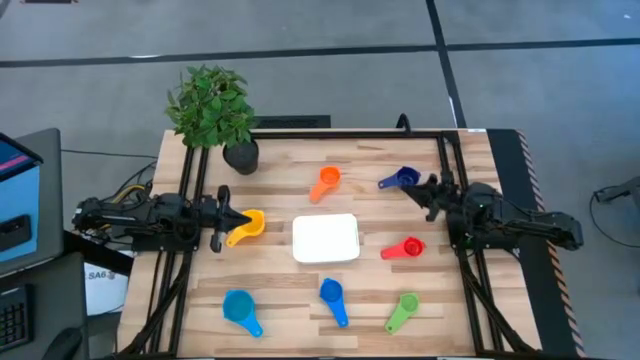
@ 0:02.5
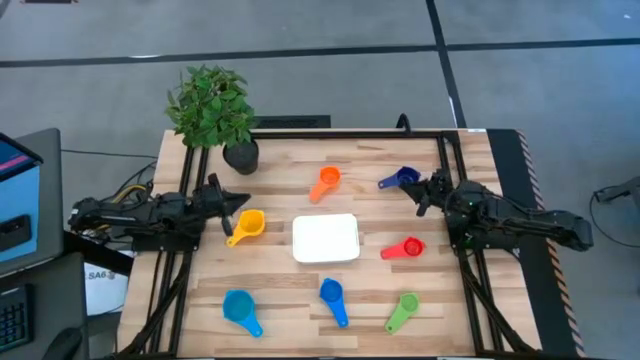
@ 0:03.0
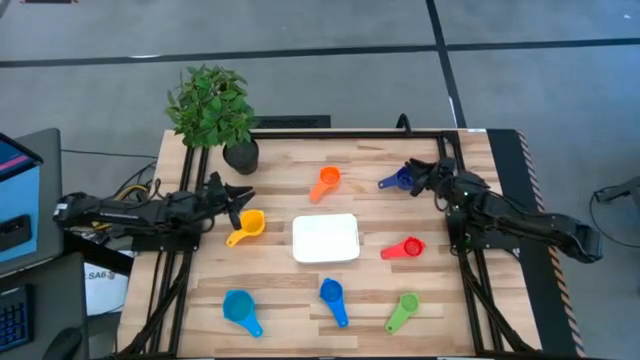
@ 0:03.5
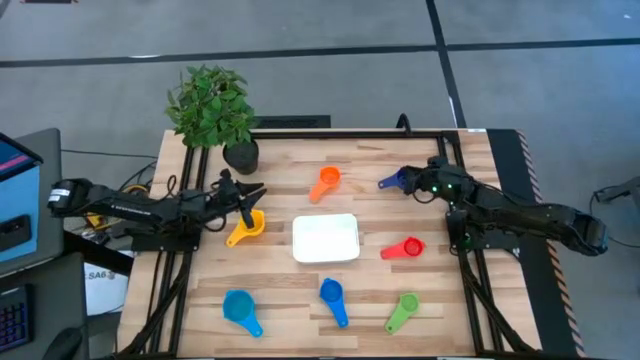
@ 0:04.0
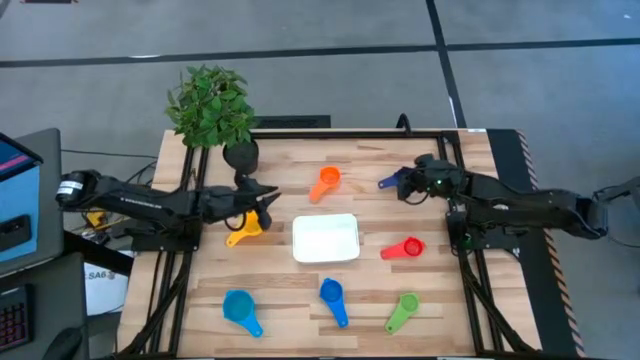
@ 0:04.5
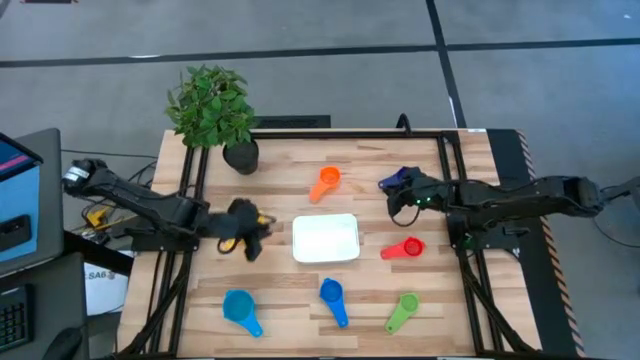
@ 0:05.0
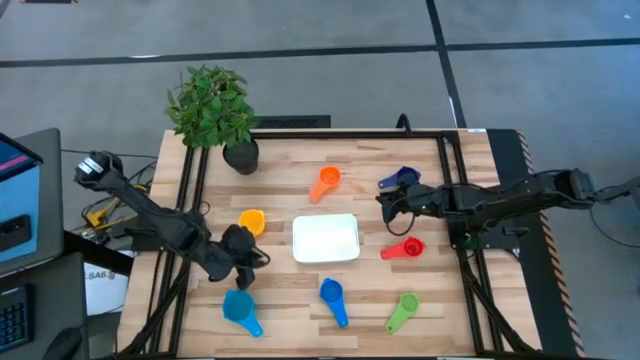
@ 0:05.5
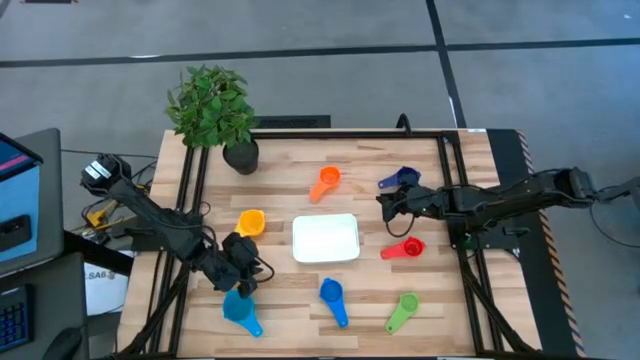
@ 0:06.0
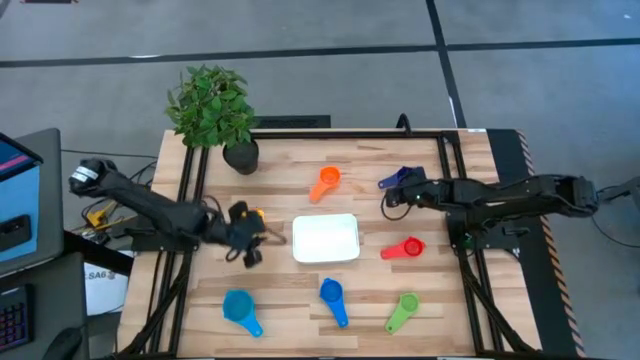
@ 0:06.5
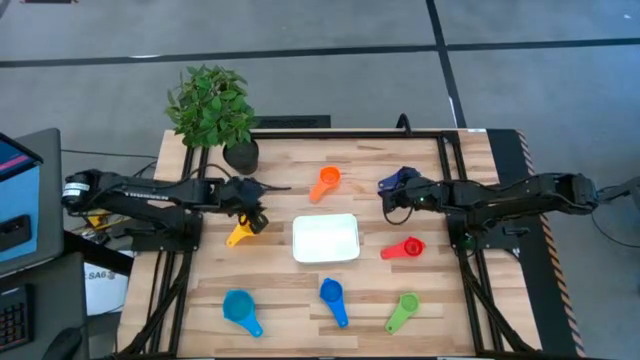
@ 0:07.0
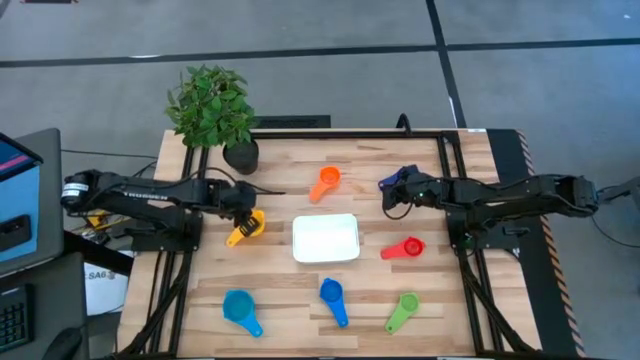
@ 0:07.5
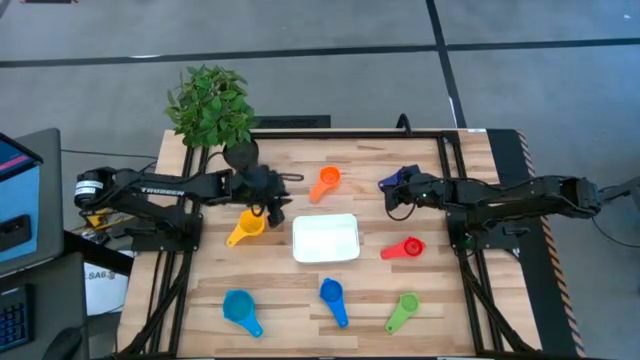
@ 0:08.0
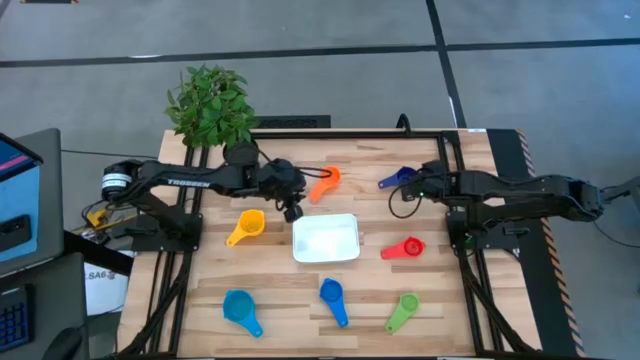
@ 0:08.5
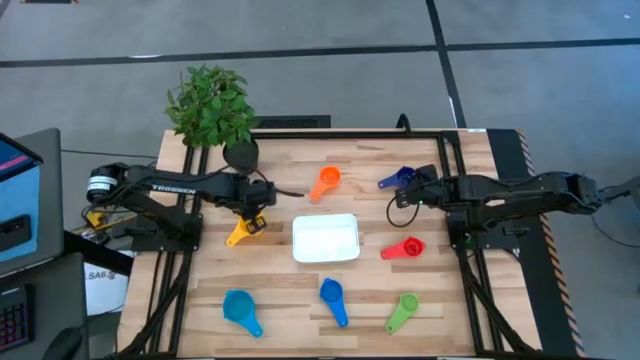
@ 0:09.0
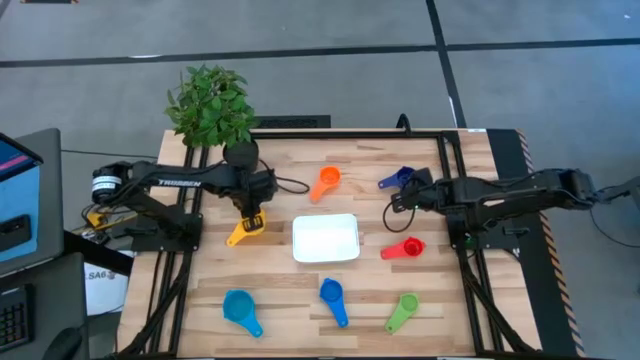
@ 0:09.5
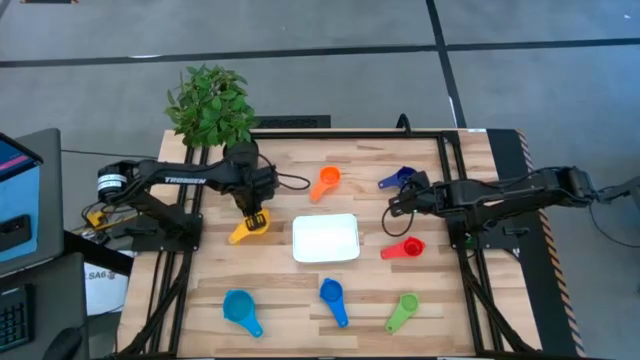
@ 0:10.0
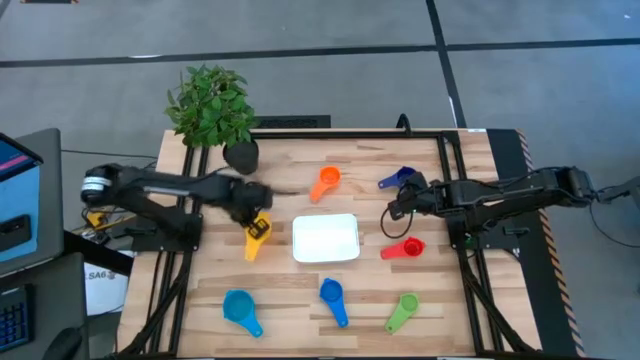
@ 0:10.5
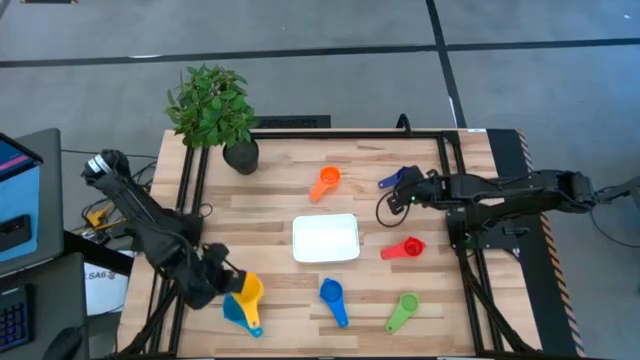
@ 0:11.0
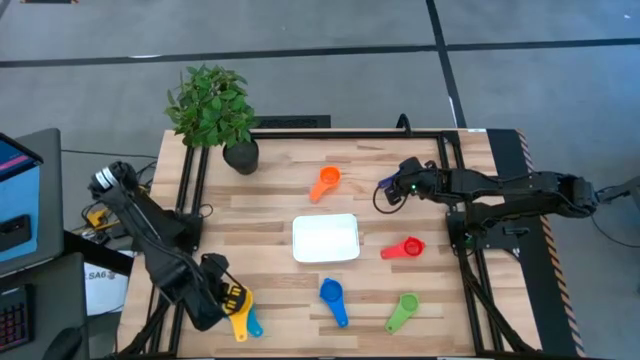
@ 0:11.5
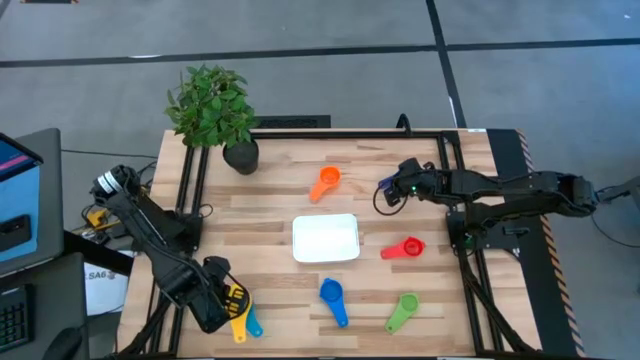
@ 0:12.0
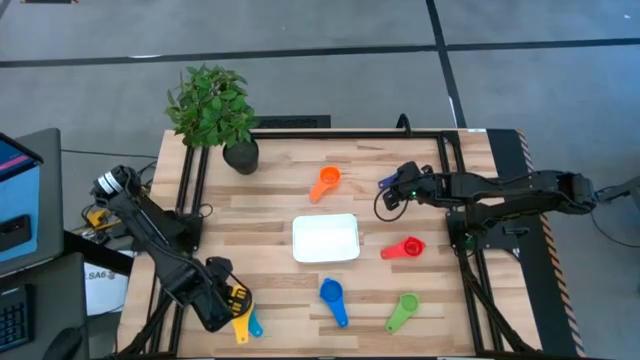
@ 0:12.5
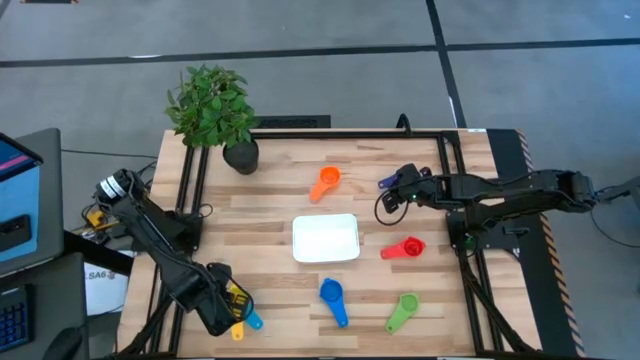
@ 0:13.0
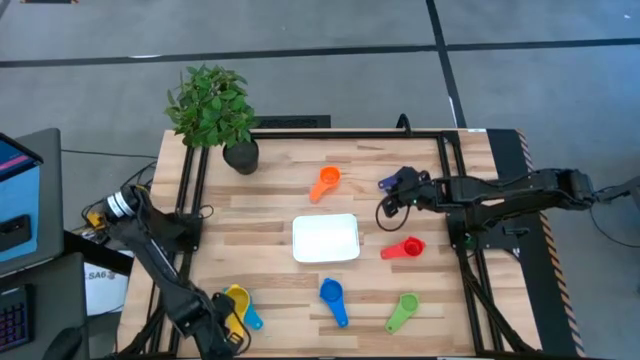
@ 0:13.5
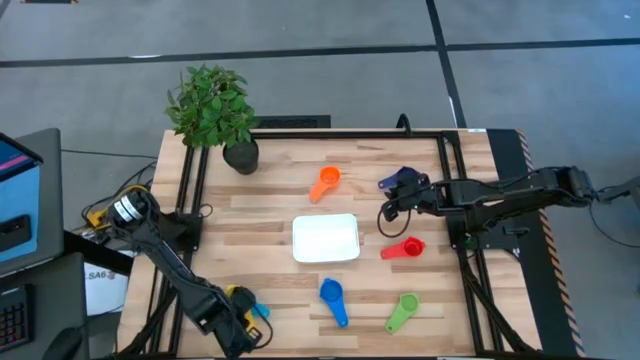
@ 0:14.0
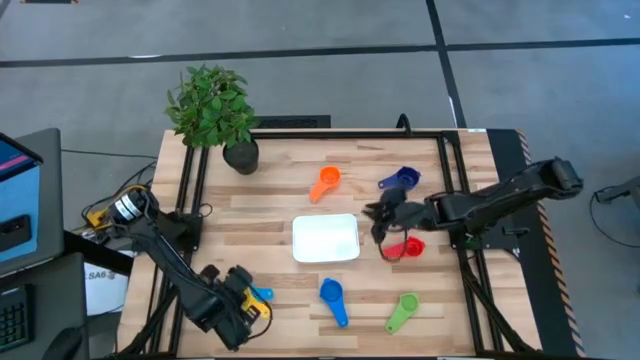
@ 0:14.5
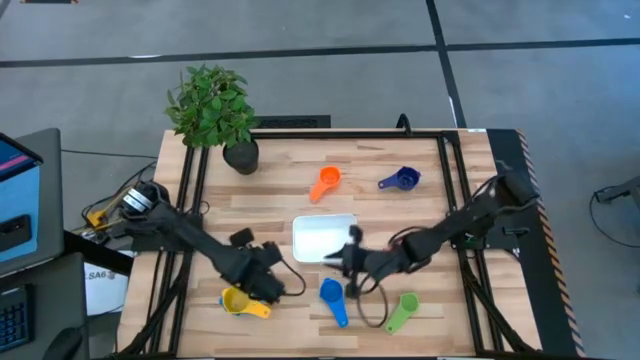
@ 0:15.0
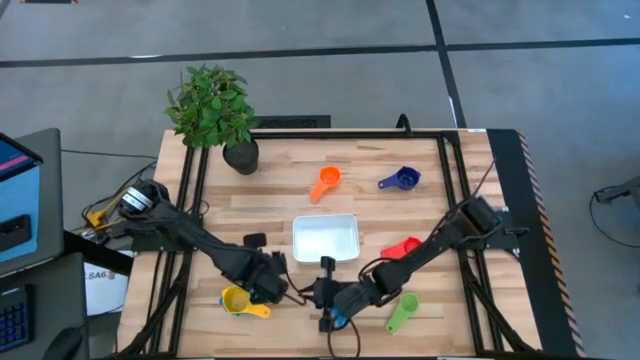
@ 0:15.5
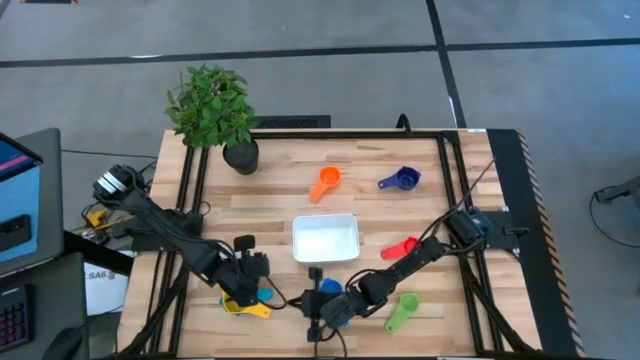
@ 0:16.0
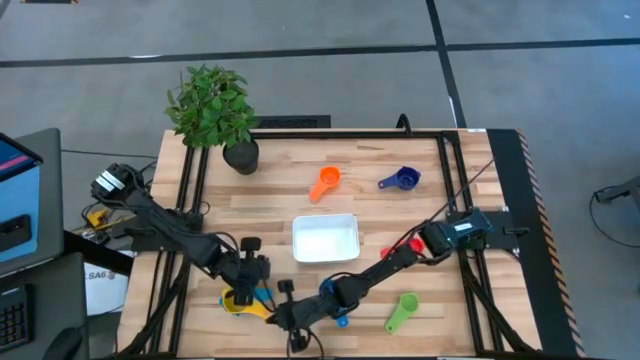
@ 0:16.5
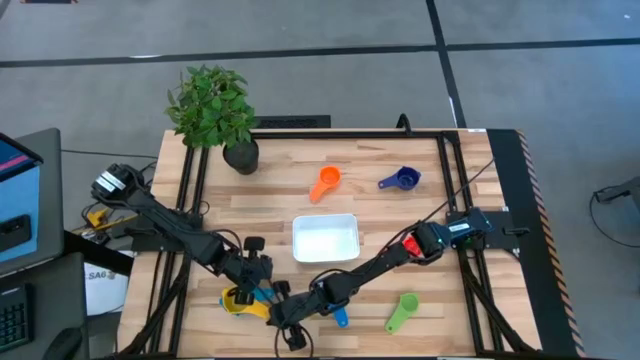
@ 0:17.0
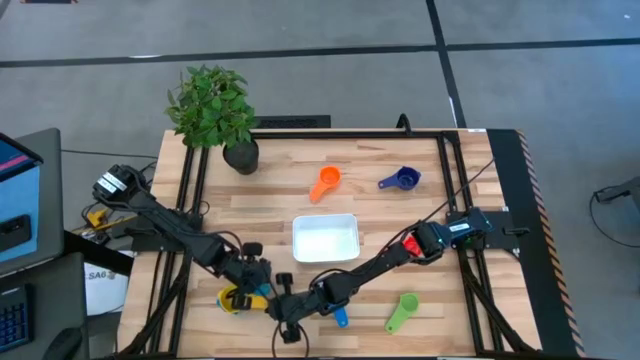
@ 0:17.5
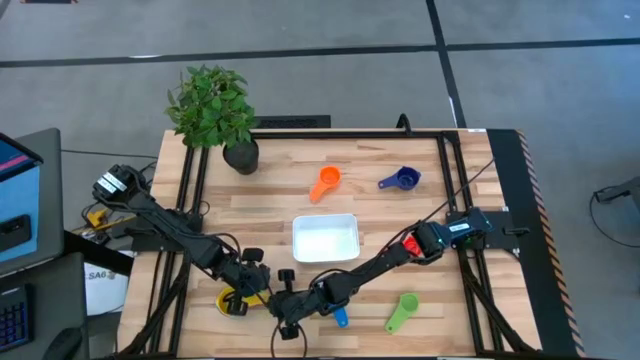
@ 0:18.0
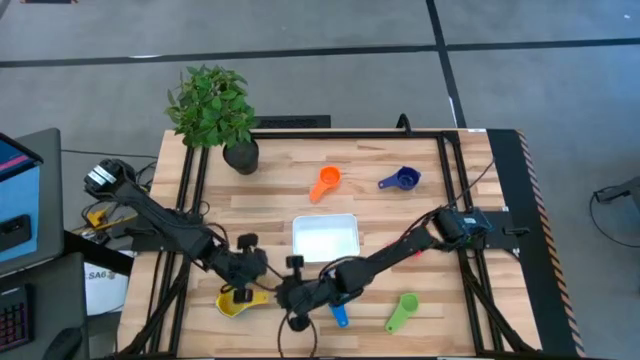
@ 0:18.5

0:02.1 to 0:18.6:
Task: Nest measuring cups in basket
Stack the yellow measuring cup into the light blue measuring cup

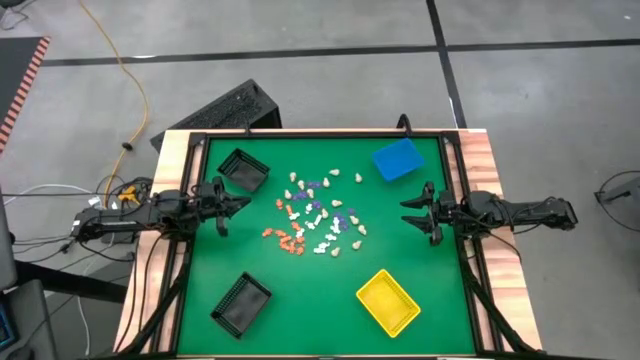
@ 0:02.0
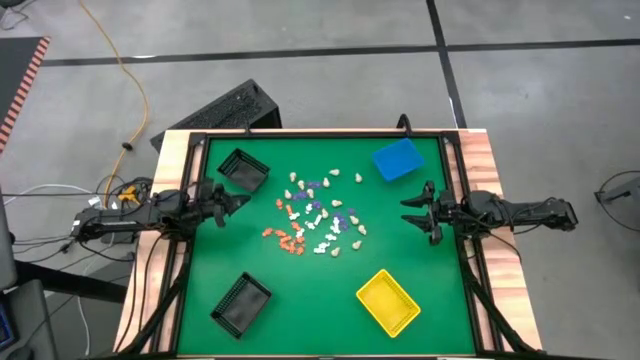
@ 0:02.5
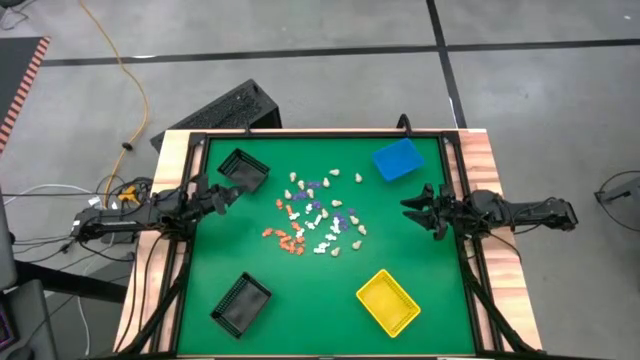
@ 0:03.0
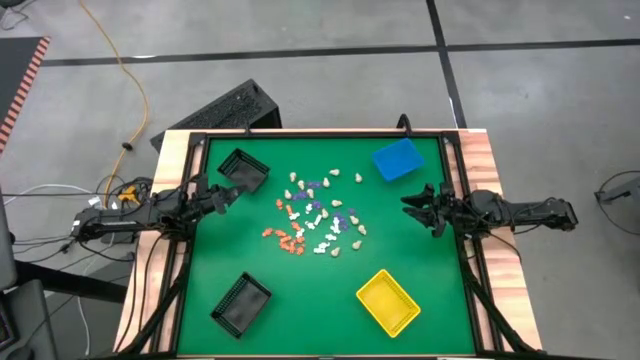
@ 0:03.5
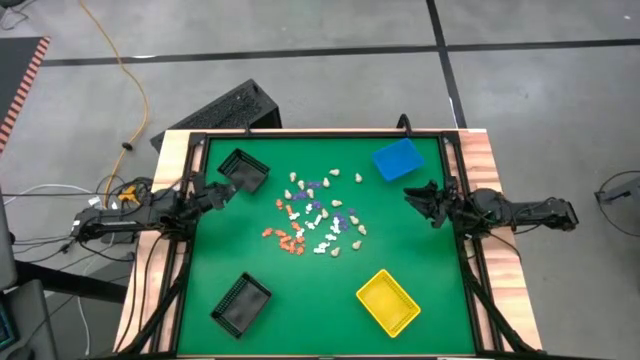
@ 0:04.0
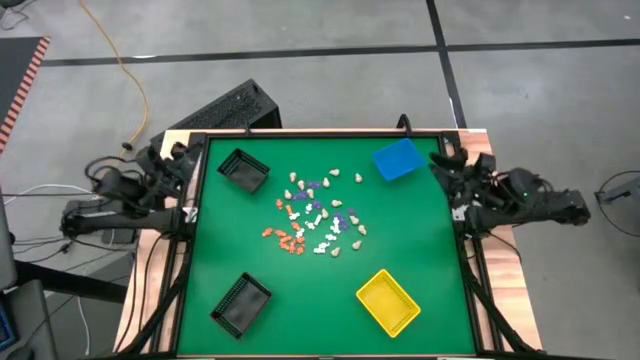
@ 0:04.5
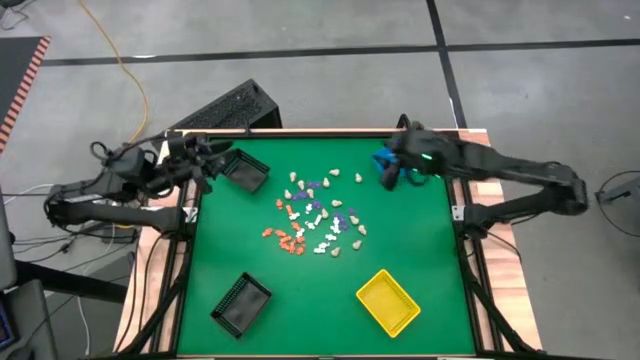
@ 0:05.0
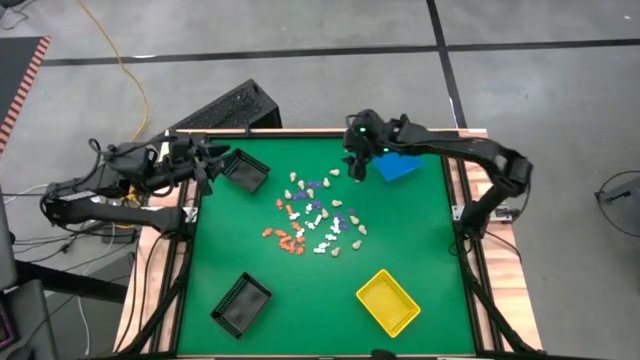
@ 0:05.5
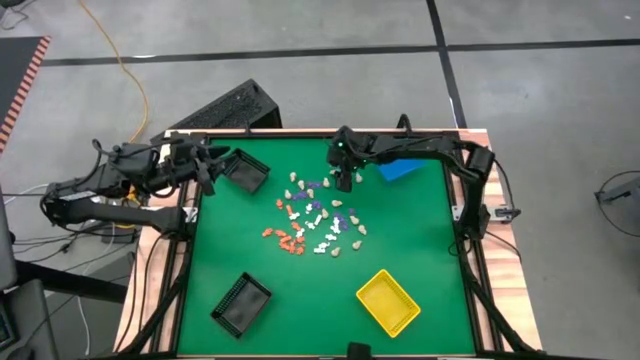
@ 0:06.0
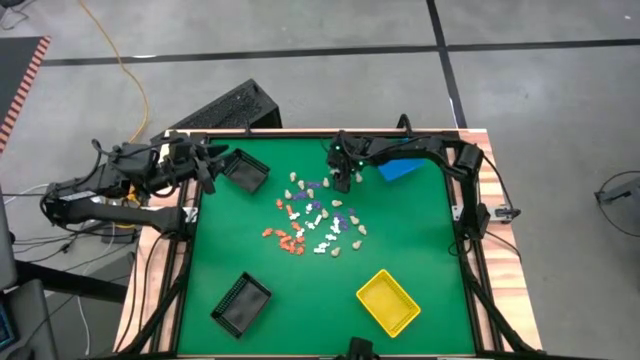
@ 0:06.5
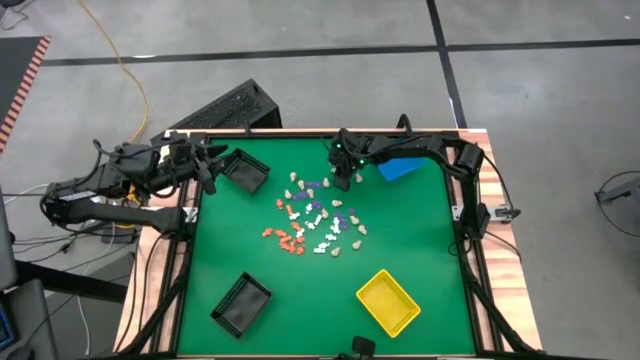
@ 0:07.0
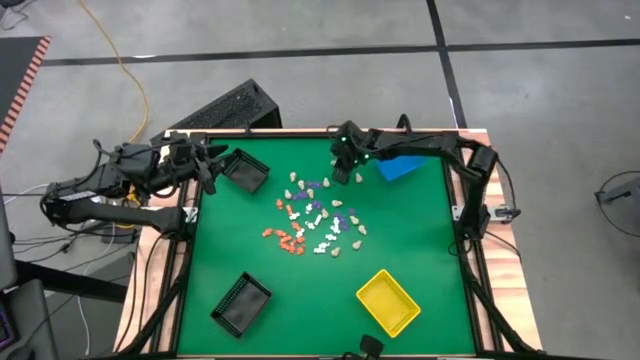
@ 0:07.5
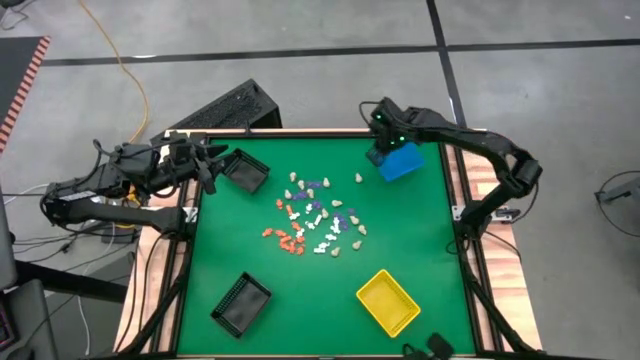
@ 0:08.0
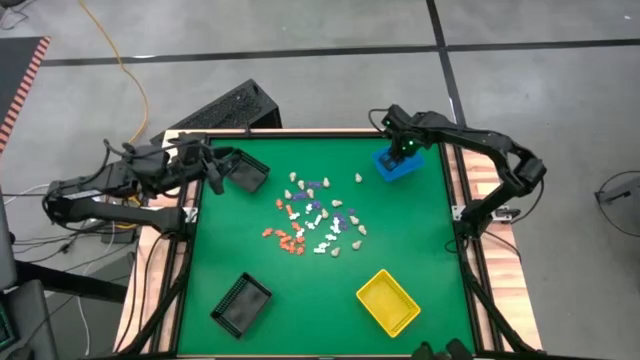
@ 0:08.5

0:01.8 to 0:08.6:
Task: Sort Halloween decoration
Put the skull toy into the blue basket
